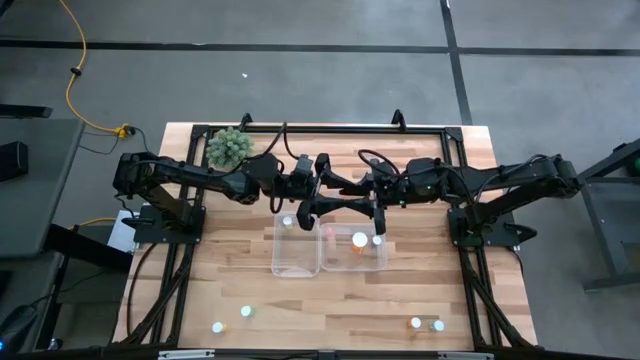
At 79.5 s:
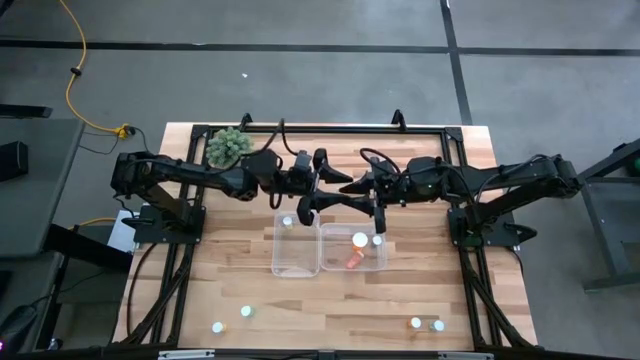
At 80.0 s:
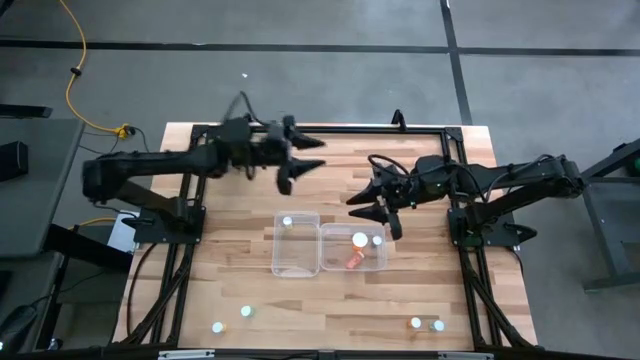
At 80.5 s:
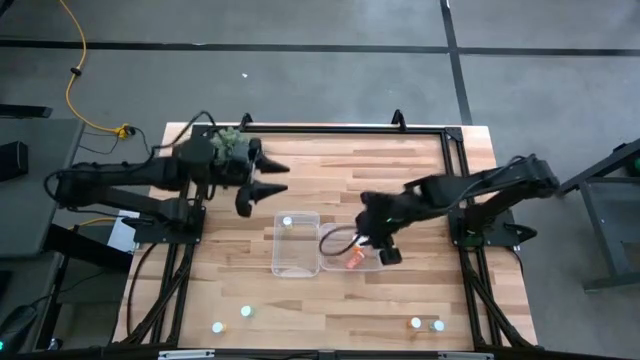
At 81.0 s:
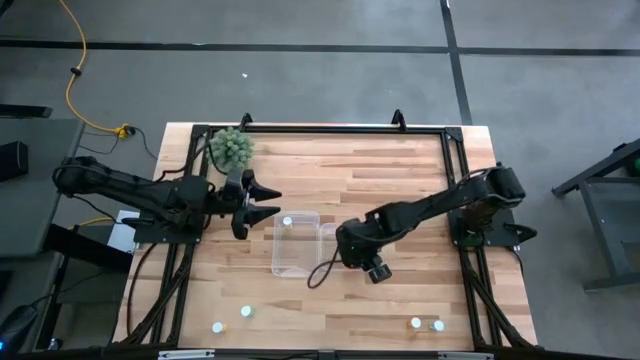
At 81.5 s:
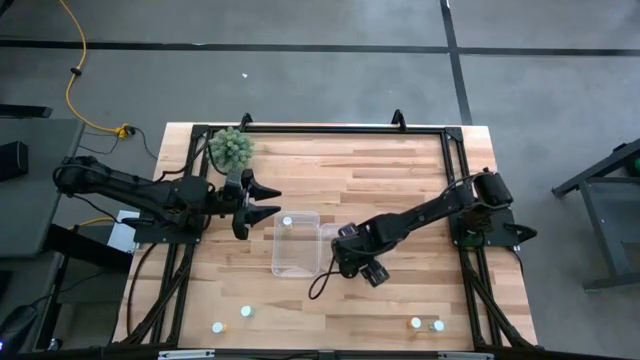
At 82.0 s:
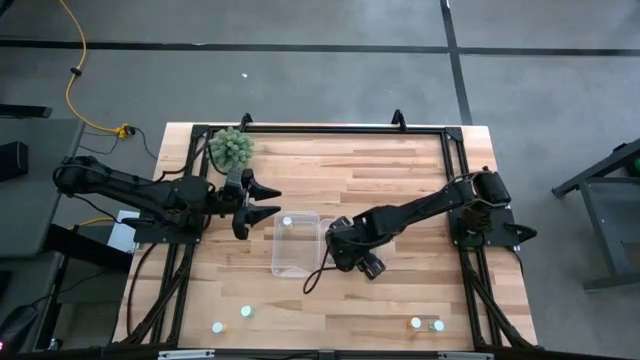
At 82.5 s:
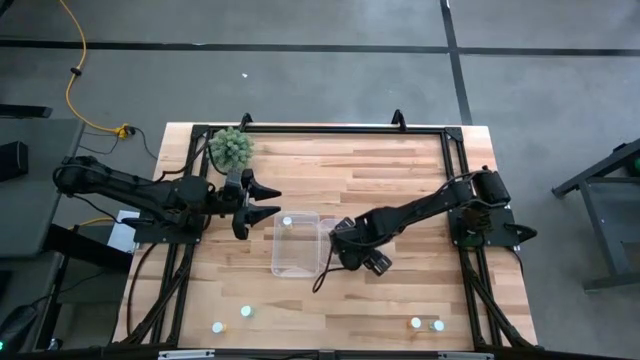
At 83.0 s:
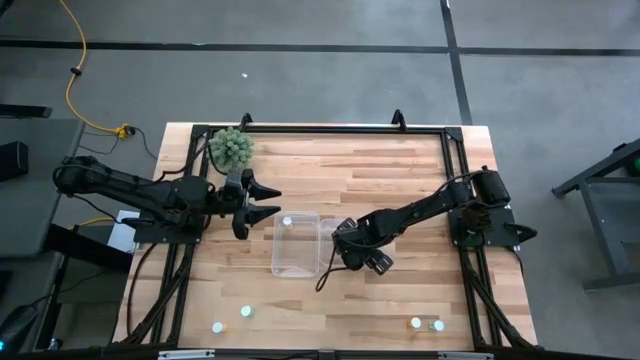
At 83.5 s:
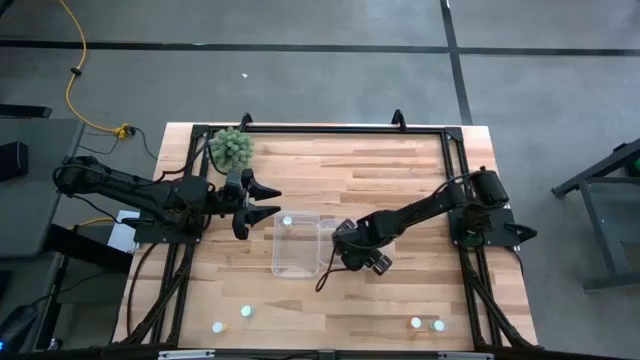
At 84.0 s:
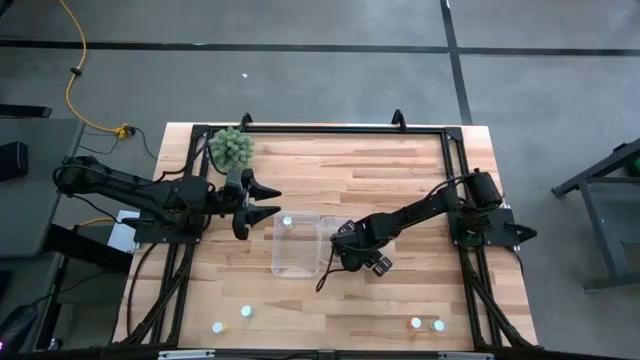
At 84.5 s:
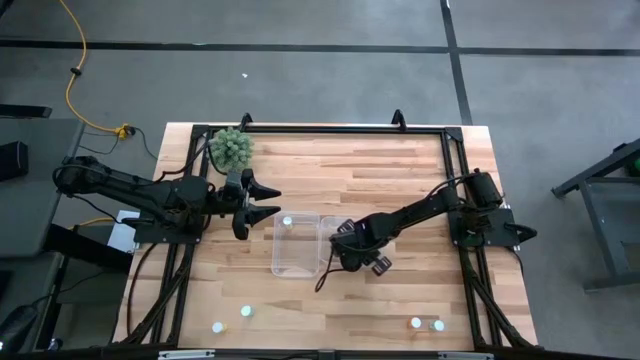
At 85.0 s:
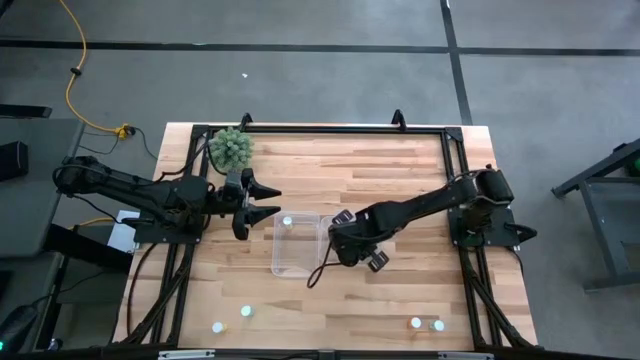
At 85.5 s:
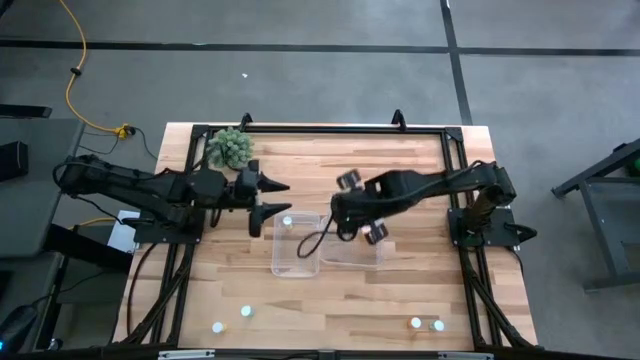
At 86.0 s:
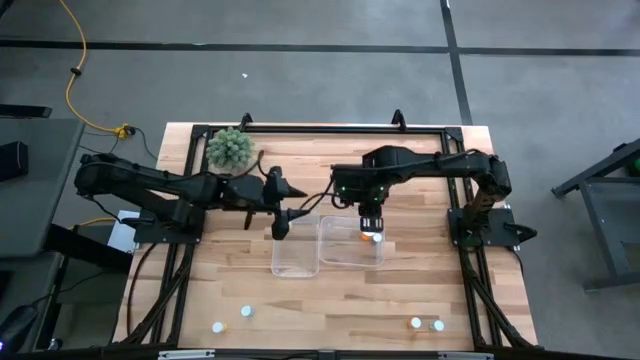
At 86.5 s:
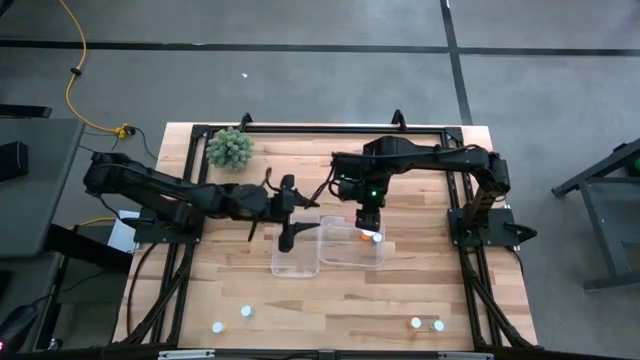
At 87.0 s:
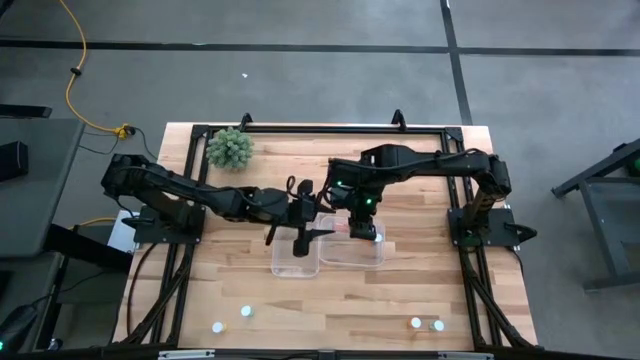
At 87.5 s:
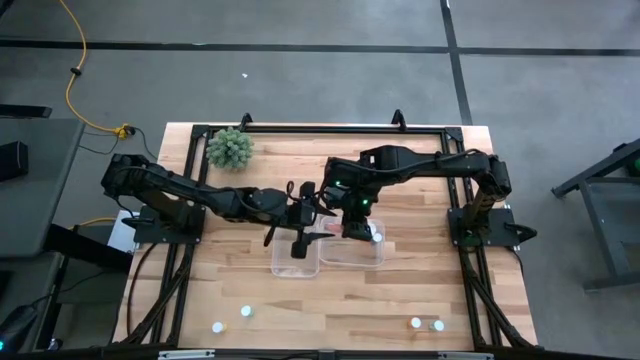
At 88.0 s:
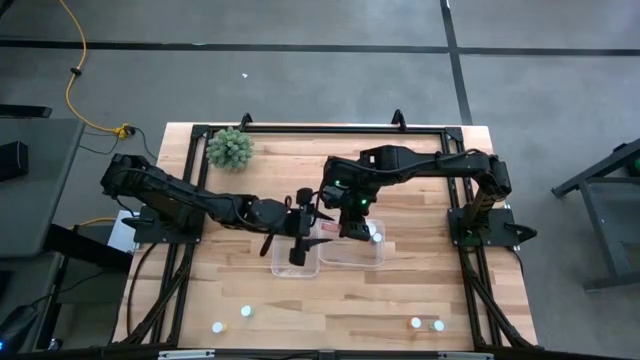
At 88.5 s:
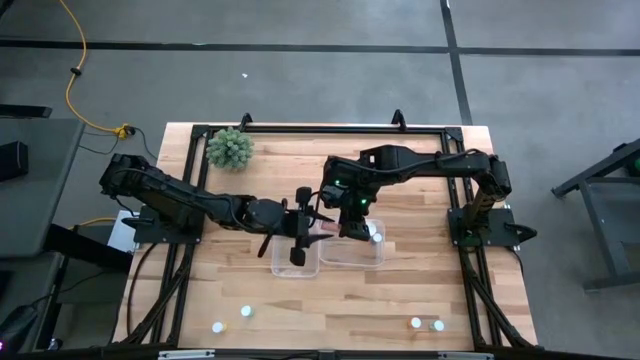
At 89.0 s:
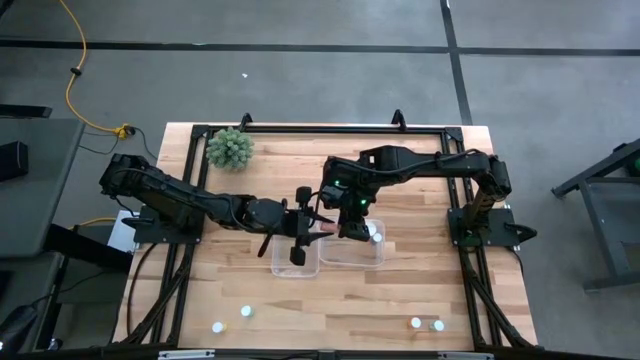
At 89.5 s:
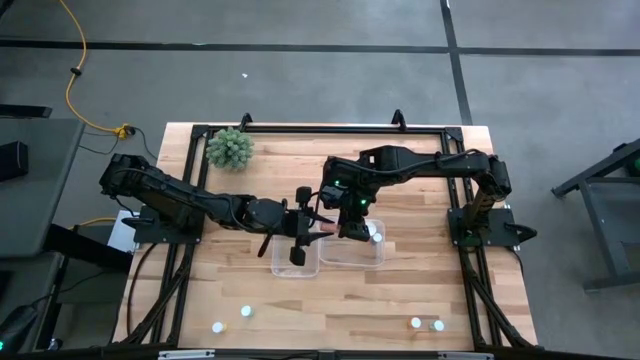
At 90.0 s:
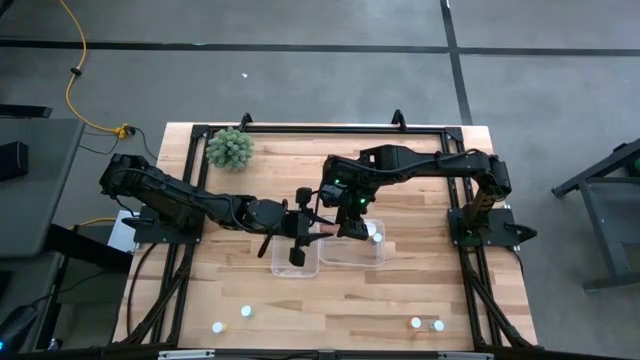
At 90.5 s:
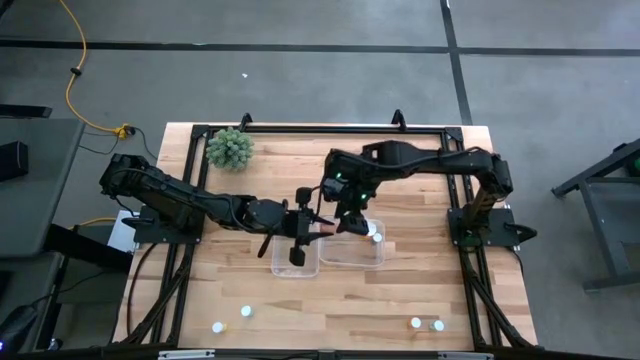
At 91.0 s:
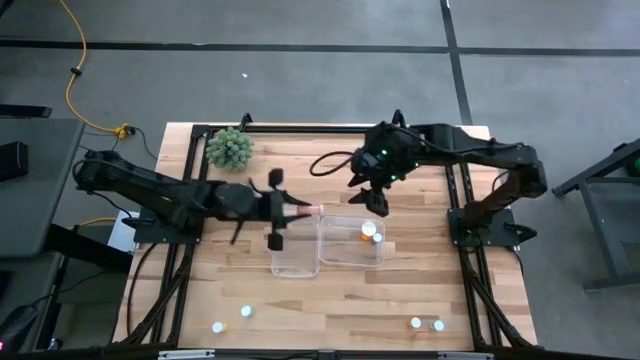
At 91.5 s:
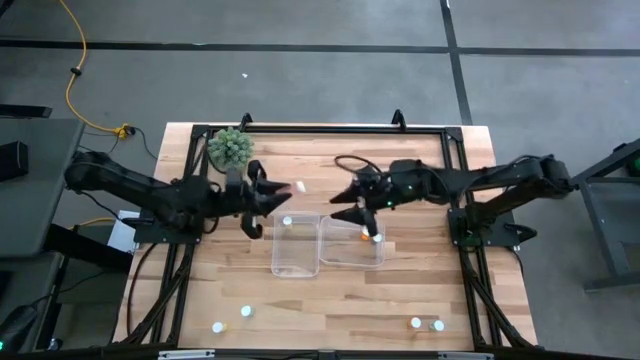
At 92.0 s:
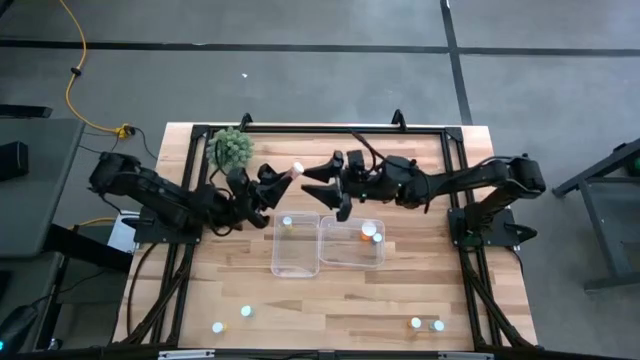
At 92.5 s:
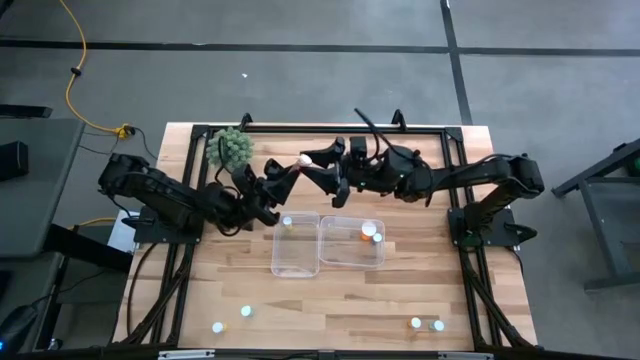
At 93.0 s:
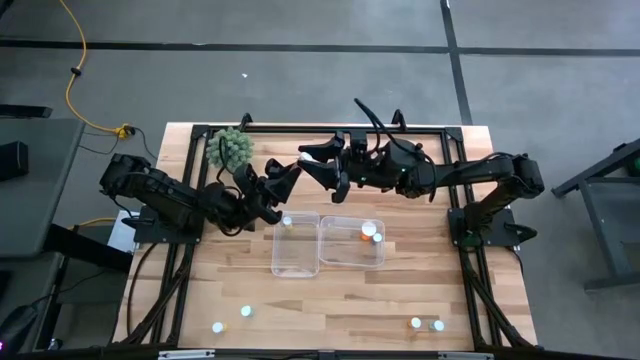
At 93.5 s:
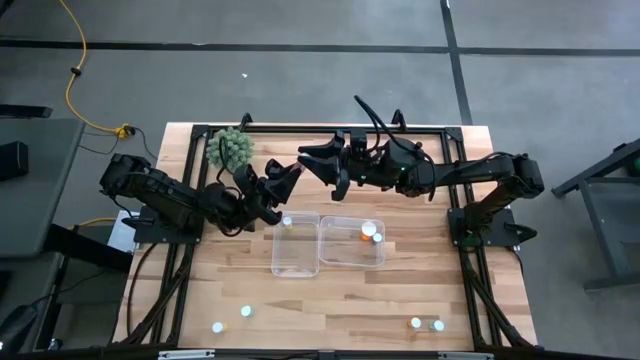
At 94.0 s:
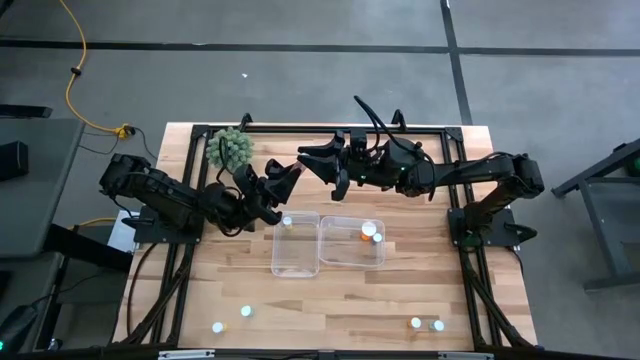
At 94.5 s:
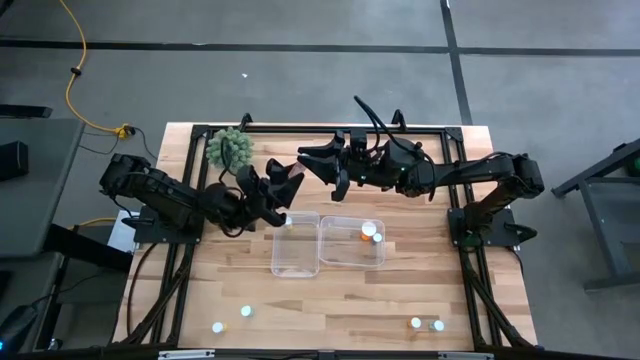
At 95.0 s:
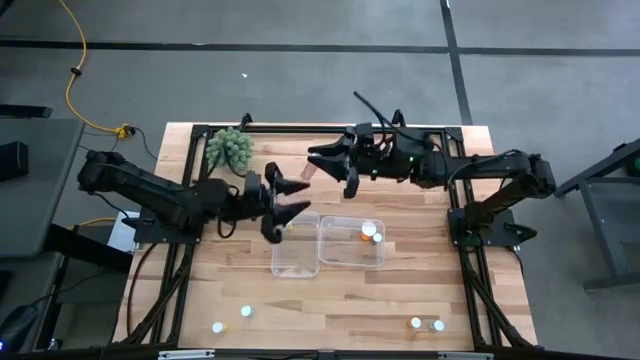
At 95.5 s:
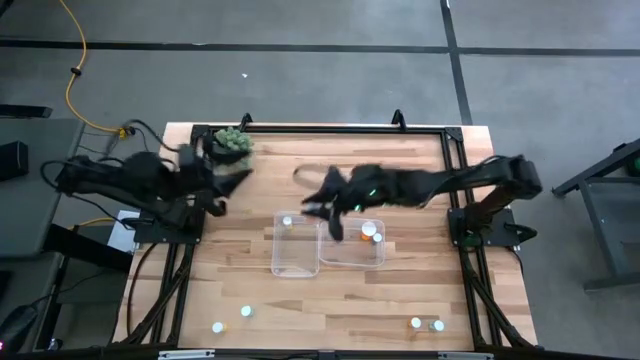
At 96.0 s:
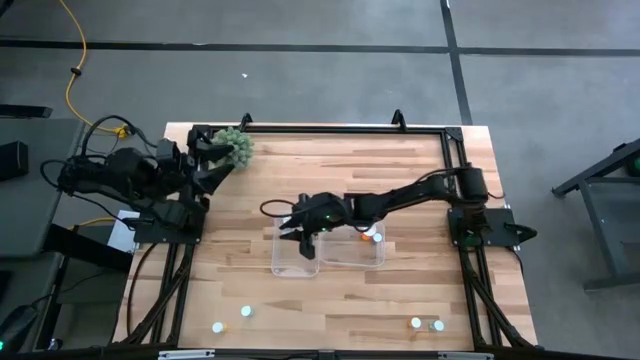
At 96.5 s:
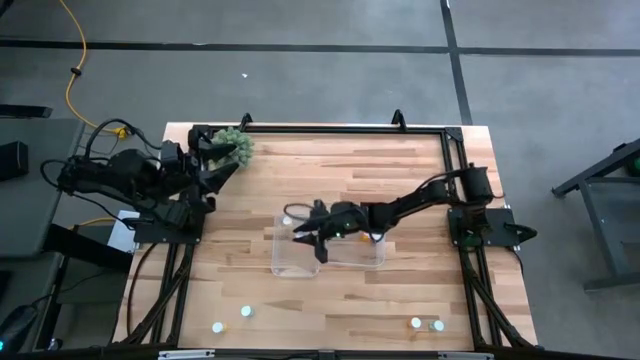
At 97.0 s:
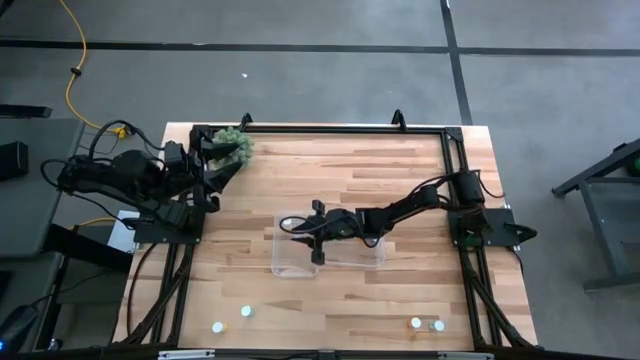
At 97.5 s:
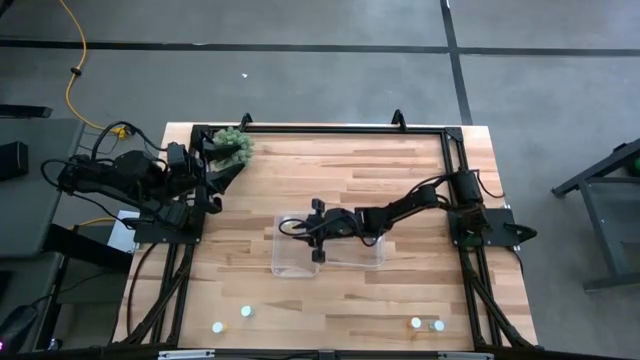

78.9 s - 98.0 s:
Task: Pick and place medicine bottles into bin by pill shape (circle, oval)
Put the red pill bottle into the left transparent bin

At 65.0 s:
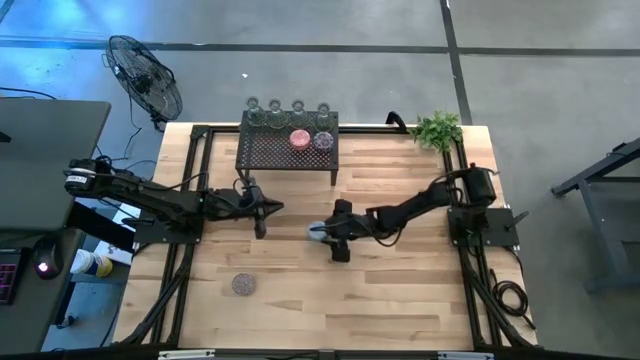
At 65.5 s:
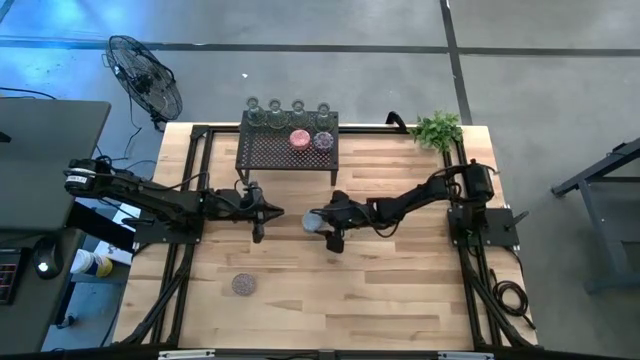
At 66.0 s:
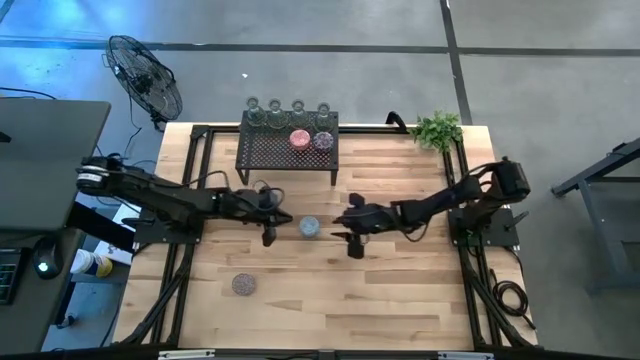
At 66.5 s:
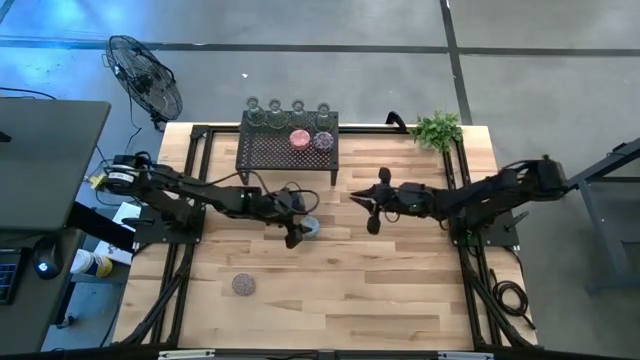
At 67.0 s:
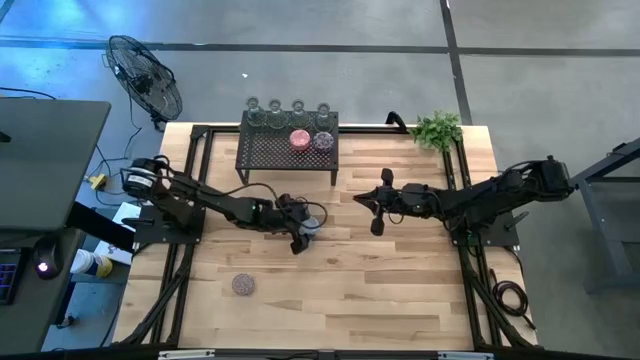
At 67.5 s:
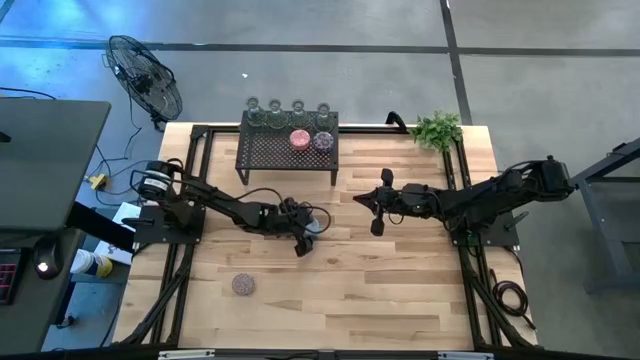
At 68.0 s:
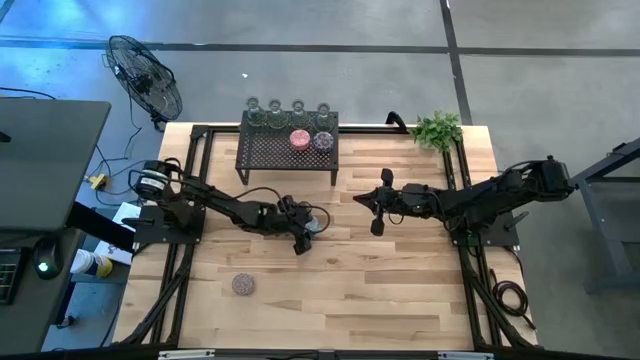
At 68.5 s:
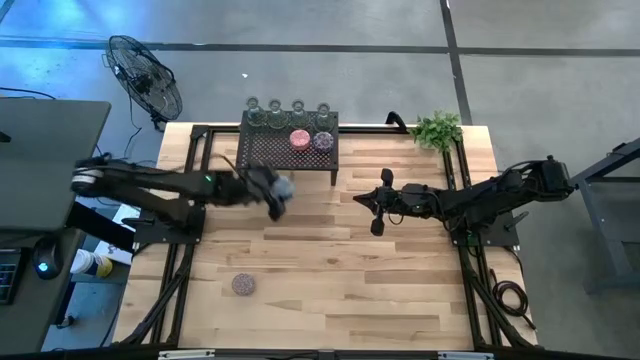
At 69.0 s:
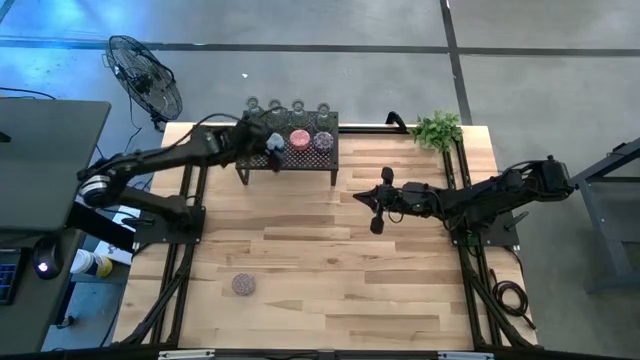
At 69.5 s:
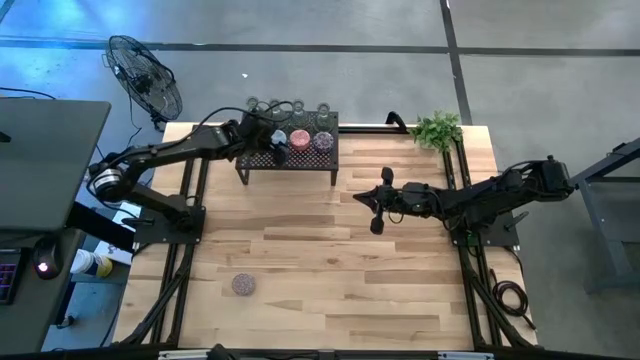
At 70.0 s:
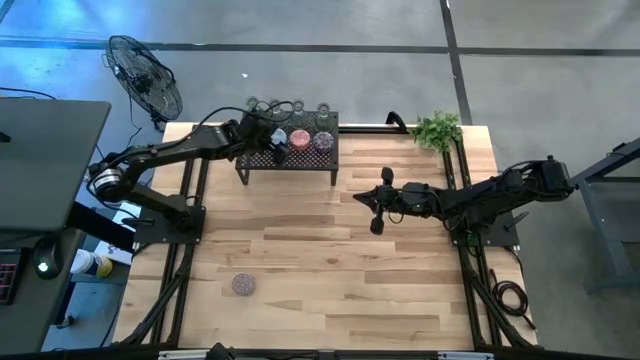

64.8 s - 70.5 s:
Task: Pick & Place candle stick holders
Put the blue scented candle on the shelf
